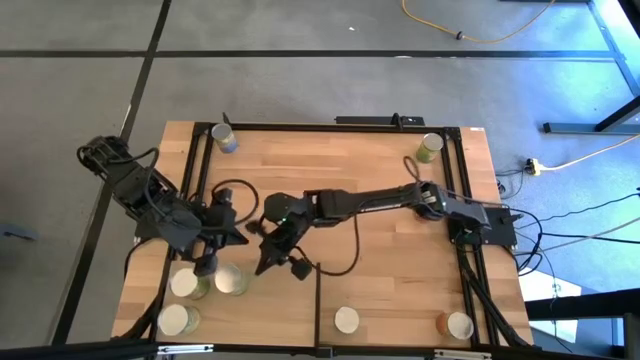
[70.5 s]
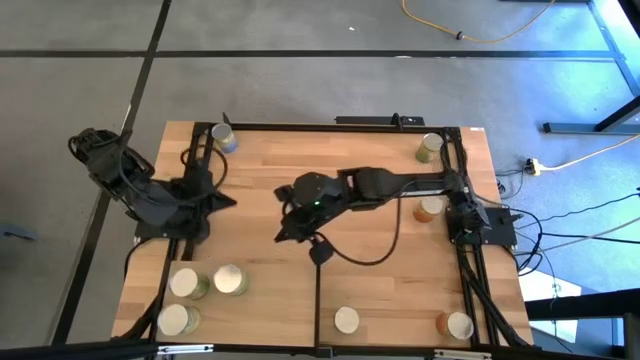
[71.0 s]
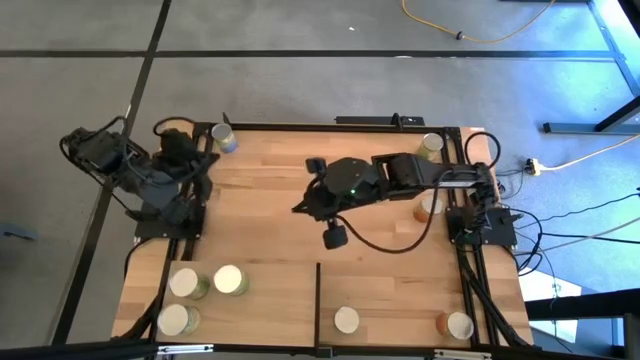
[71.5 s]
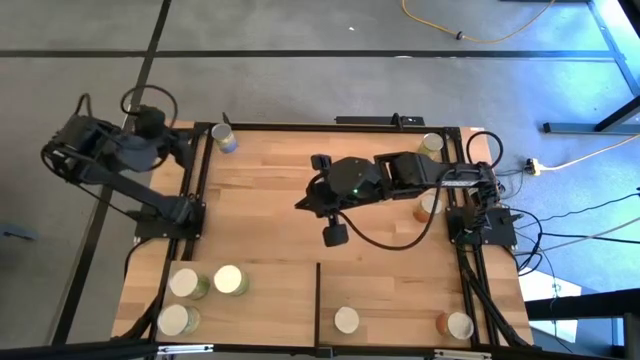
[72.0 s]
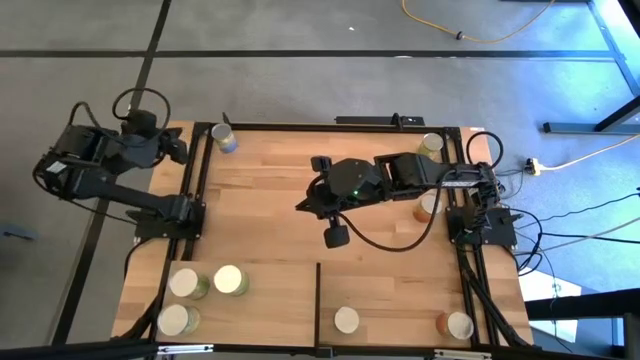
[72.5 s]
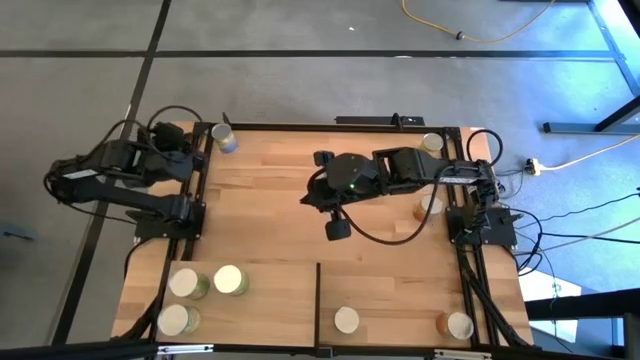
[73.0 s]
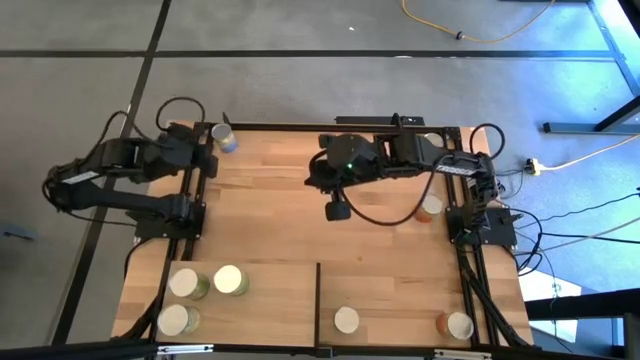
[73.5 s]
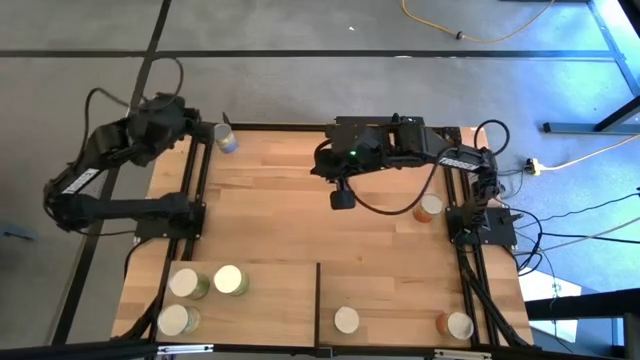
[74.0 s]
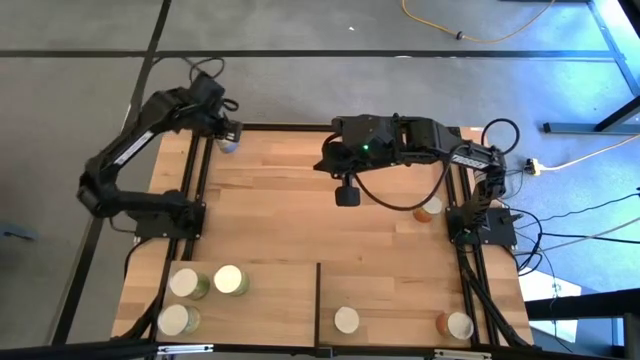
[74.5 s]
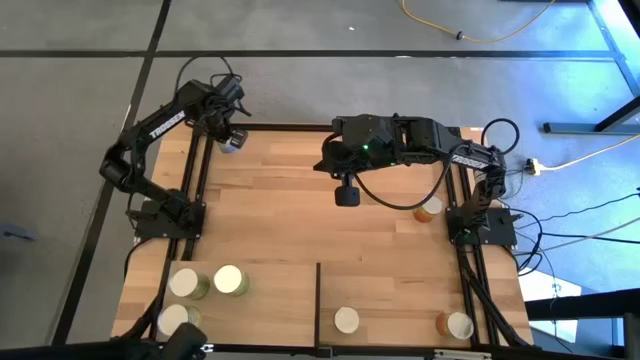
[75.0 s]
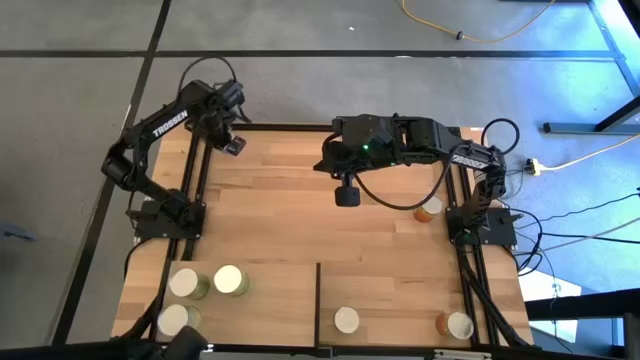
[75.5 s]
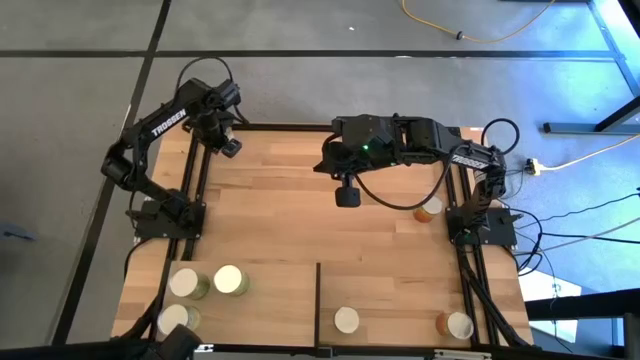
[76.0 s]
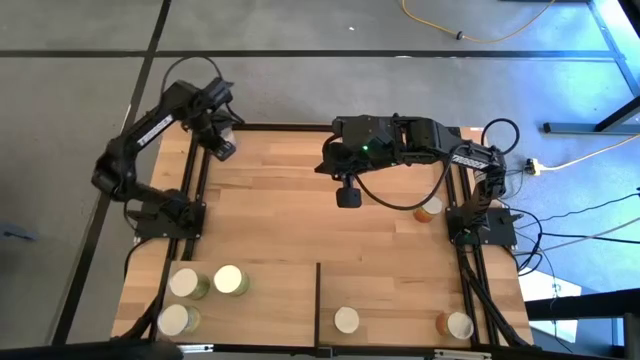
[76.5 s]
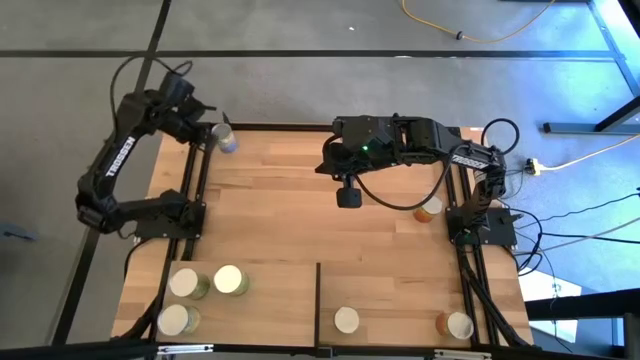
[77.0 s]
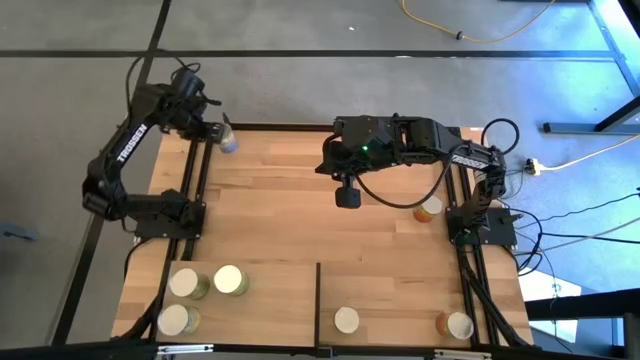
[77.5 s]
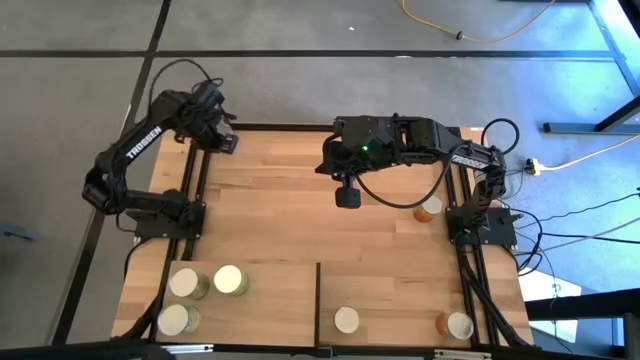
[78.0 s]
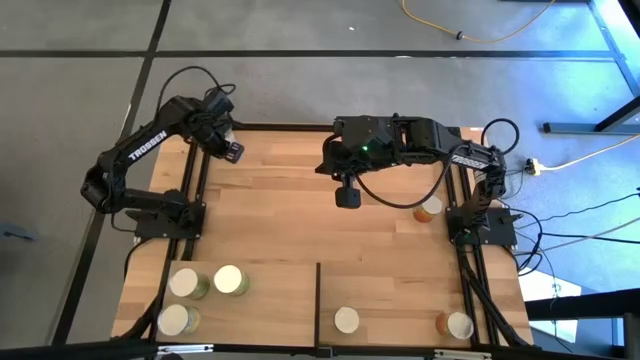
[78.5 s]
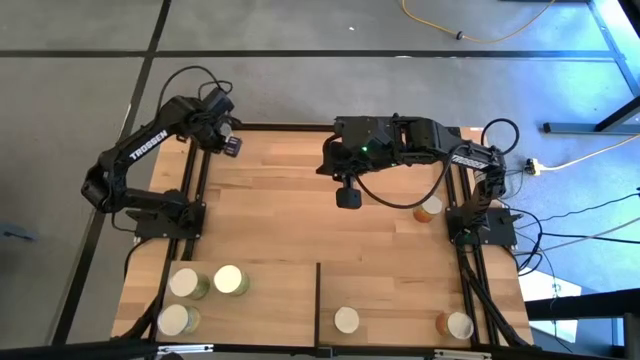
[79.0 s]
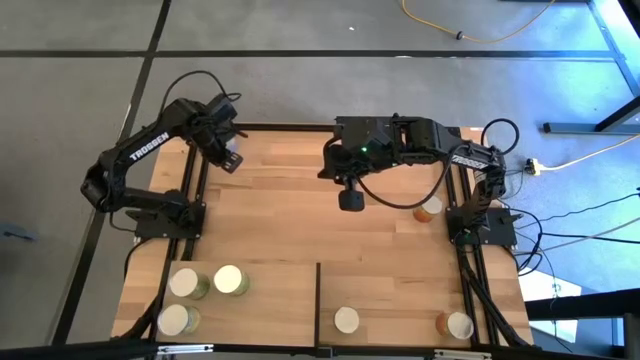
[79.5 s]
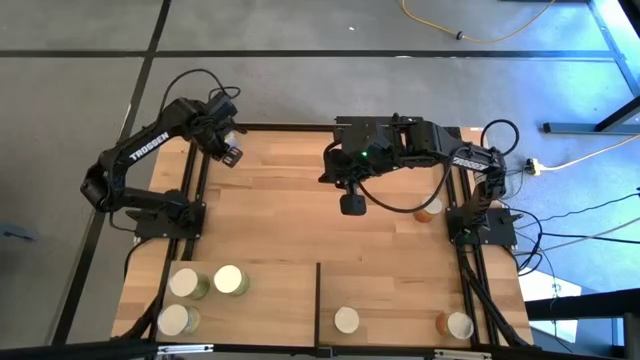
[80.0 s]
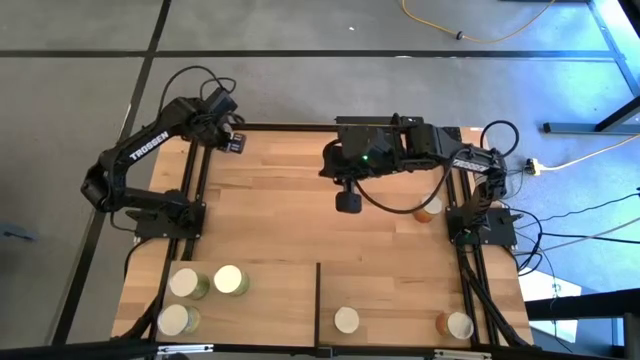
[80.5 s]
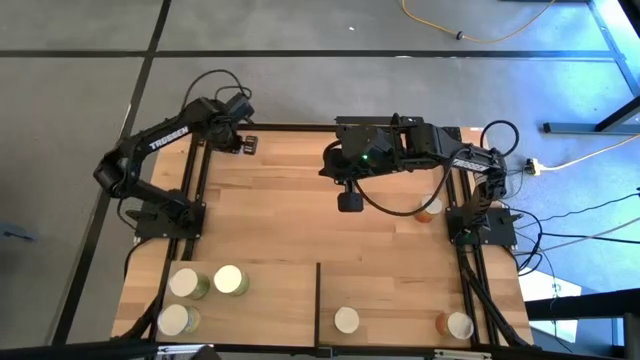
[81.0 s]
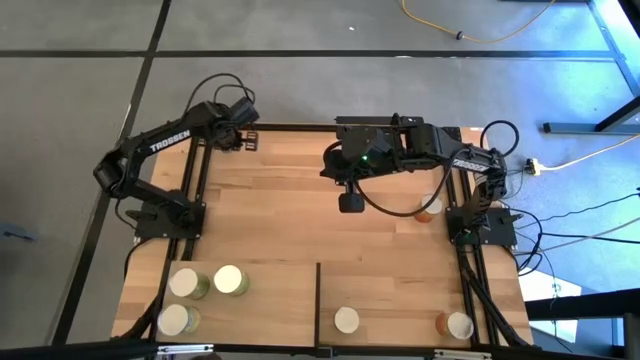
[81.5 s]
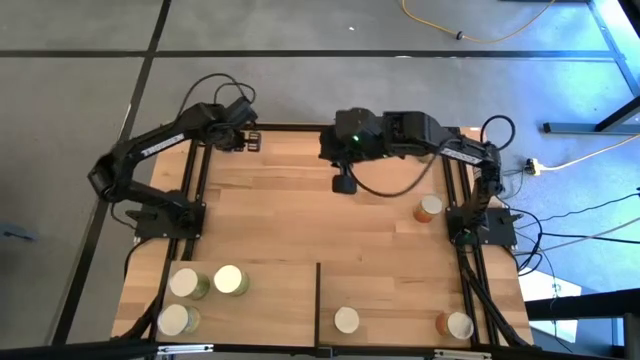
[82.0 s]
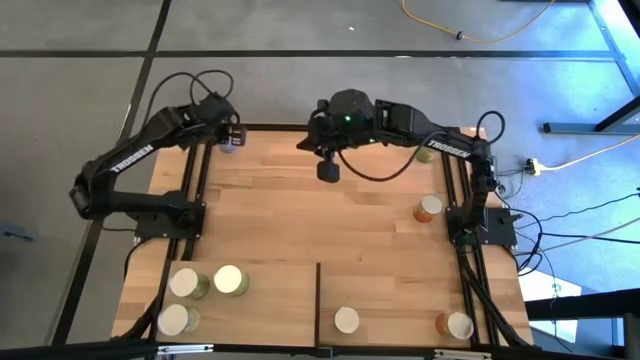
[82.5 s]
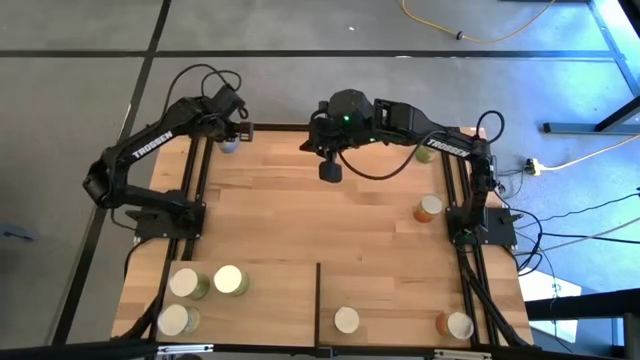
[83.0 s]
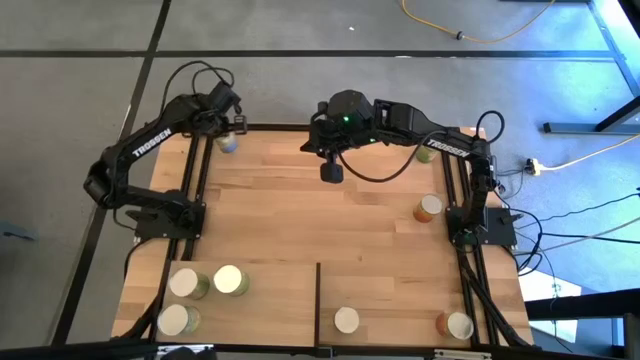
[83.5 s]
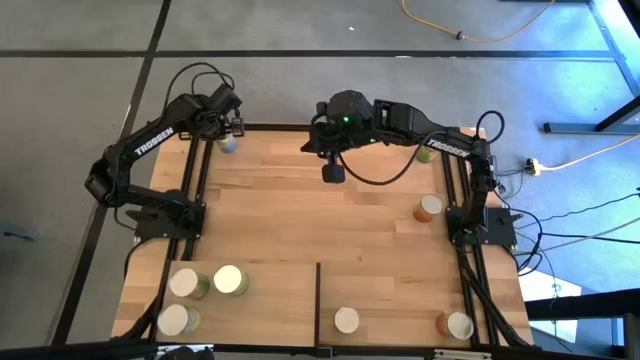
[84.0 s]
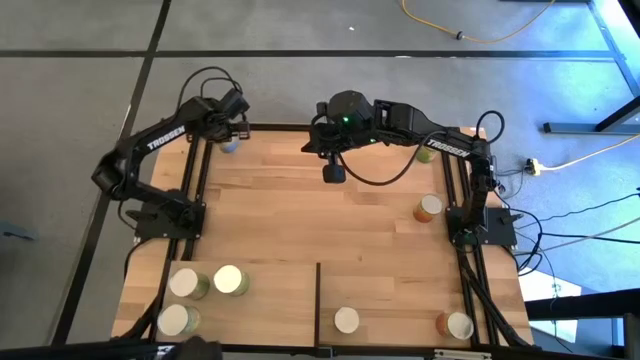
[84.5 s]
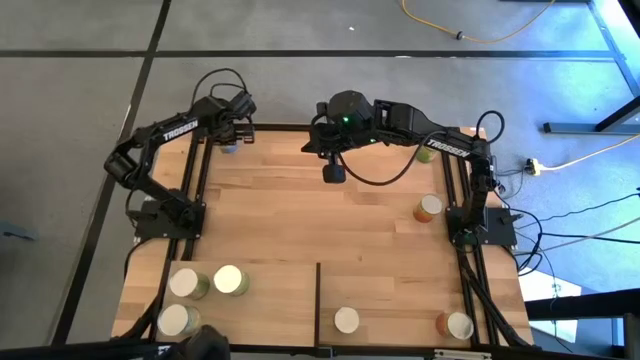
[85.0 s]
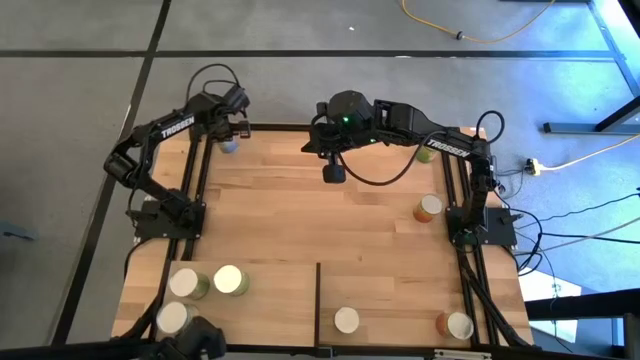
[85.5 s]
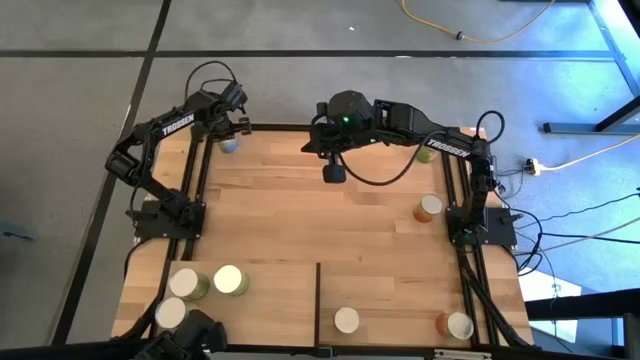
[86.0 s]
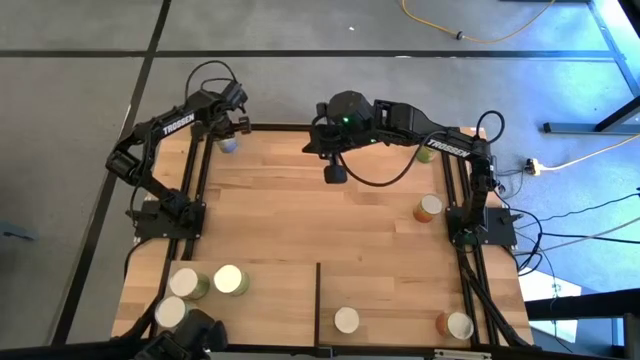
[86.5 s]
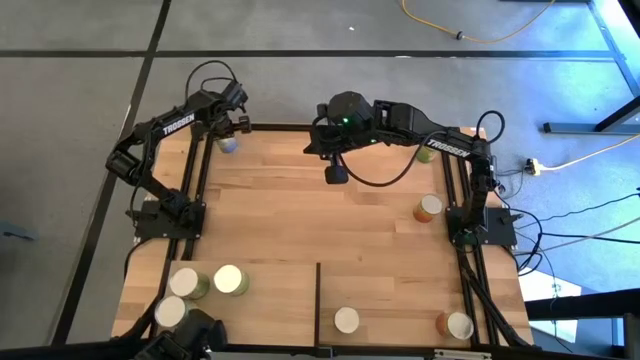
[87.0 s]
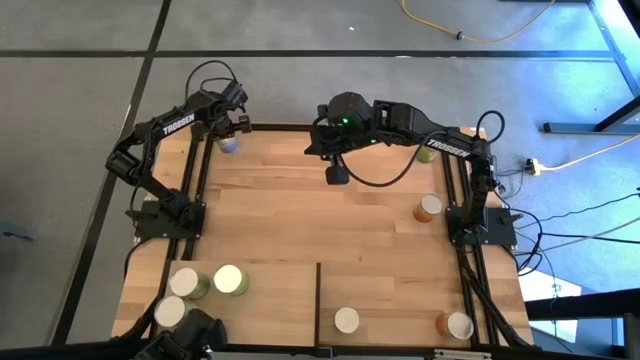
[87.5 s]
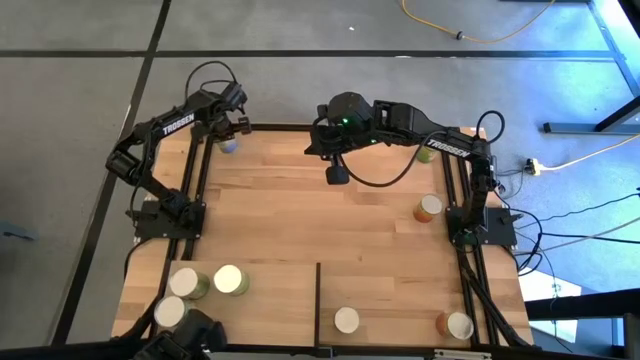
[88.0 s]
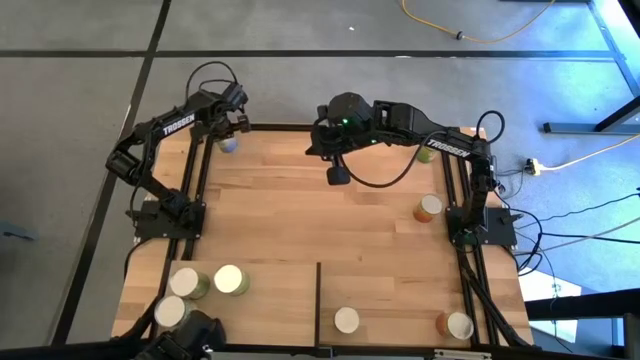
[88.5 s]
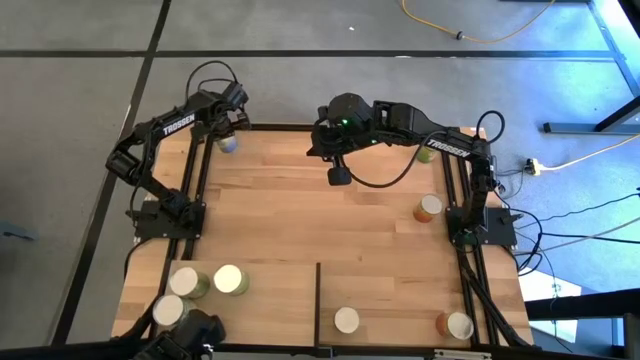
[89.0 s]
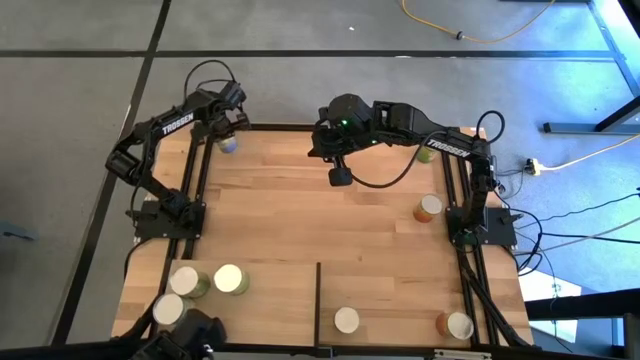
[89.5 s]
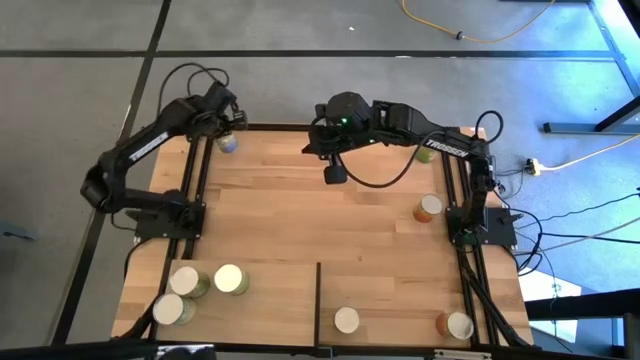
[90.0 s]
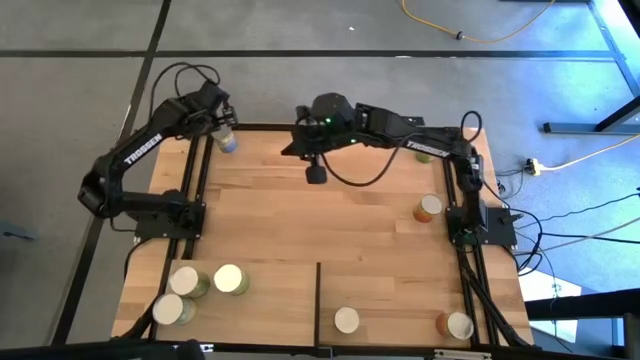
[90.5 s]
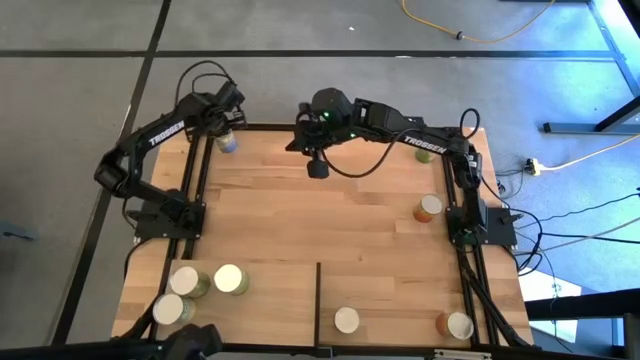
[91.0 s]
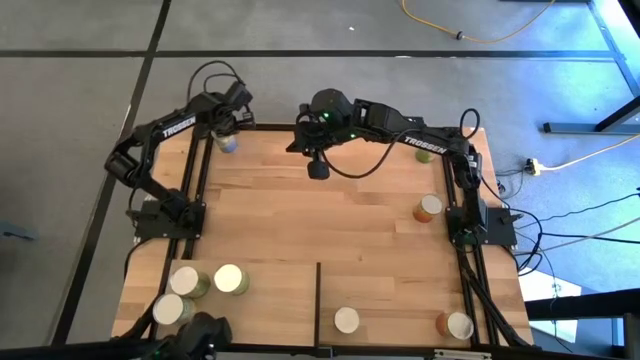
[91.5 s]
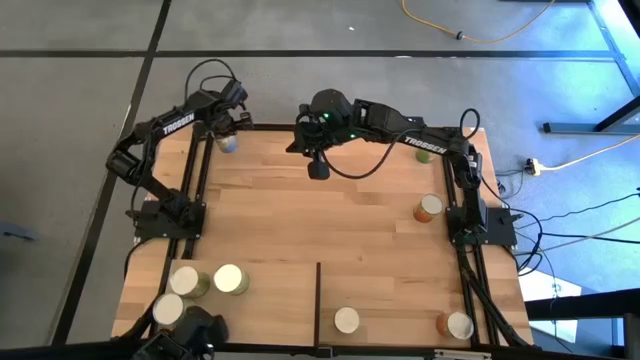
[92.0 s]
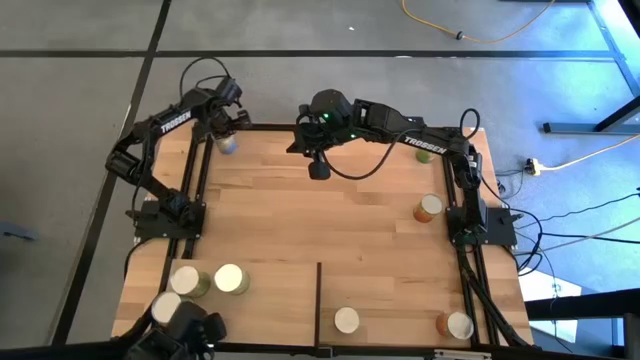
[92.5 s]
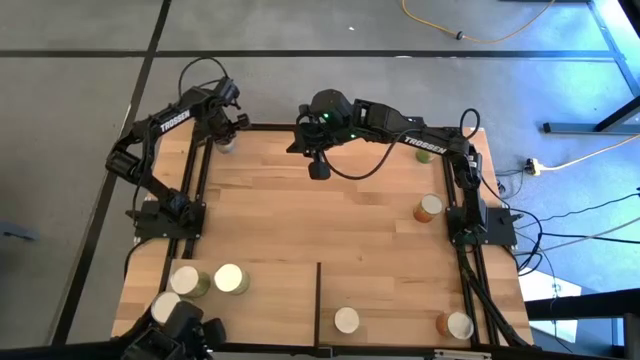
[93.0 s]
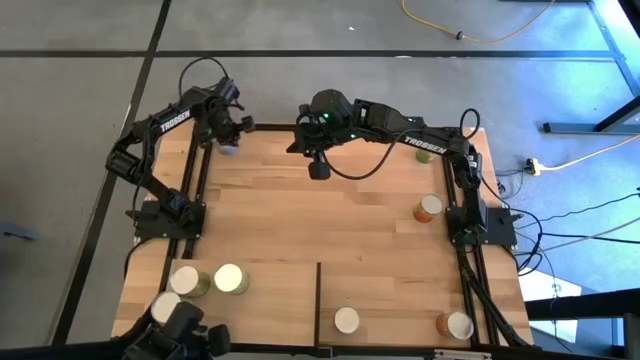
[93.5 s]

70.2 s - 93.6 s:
Task: Pick and place cans onto a shelf
Put the canned peas on the shelf
